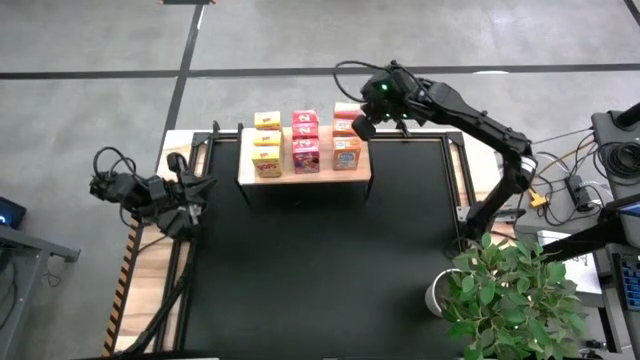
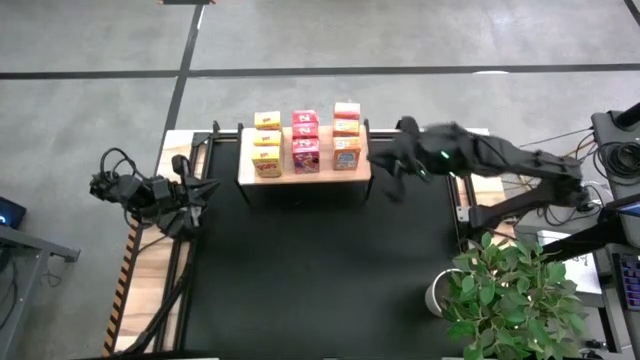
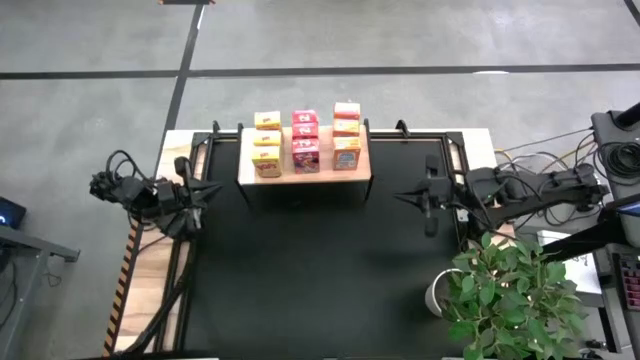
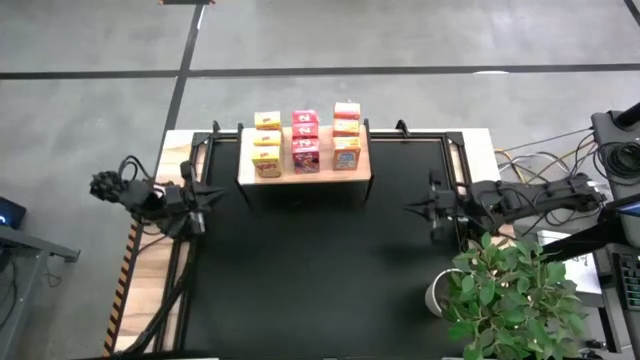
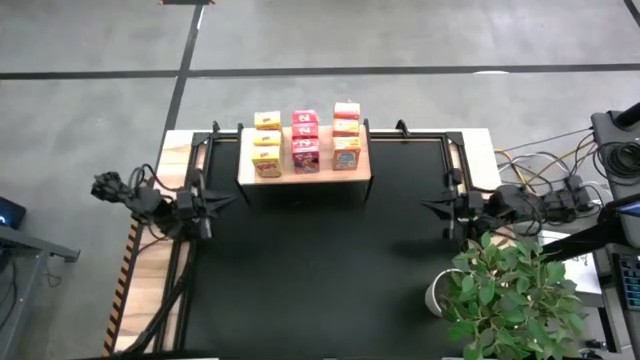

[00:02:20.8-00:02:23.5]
Task: Stack cereal on shelf
Return to Home Position

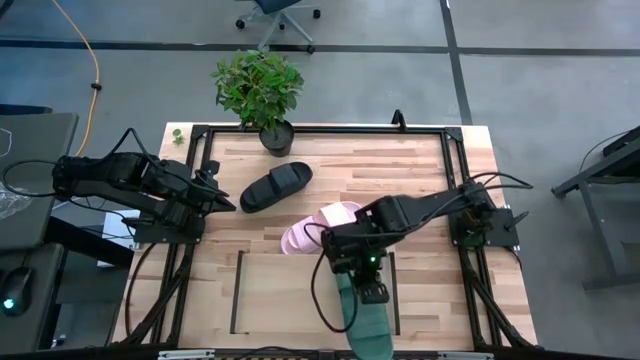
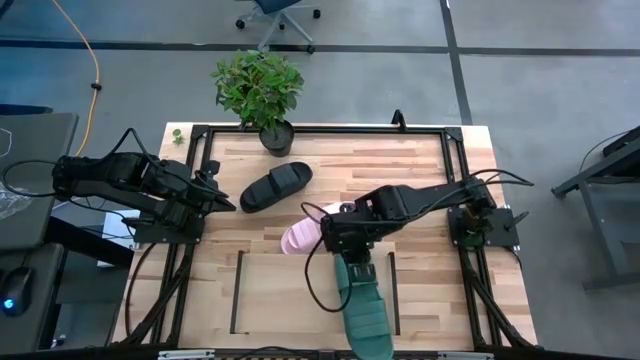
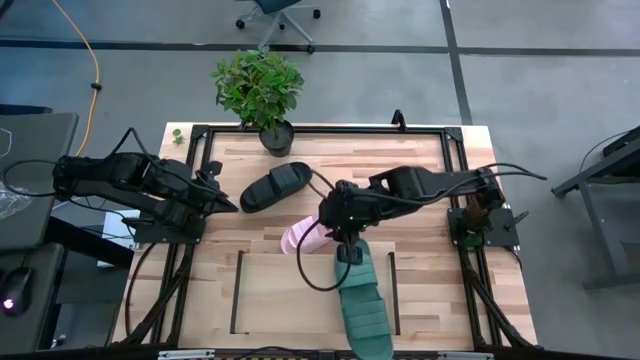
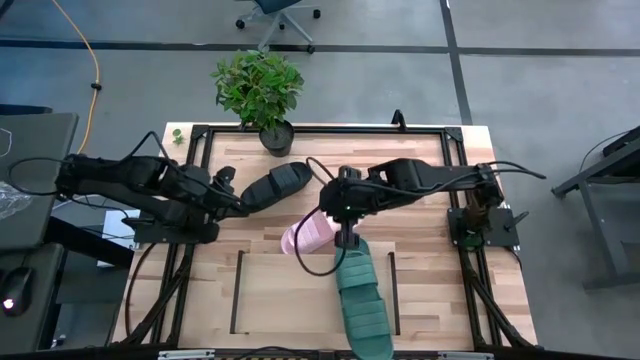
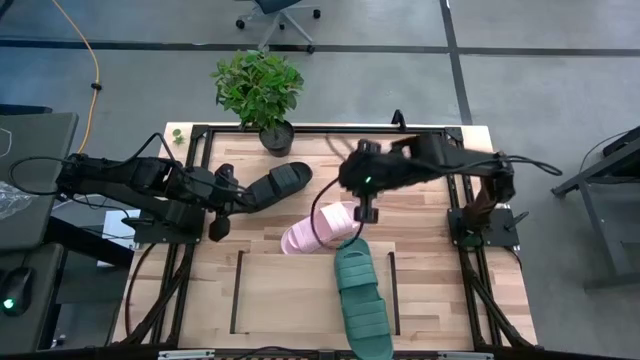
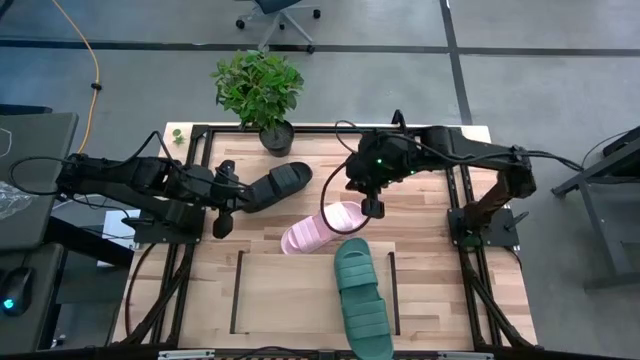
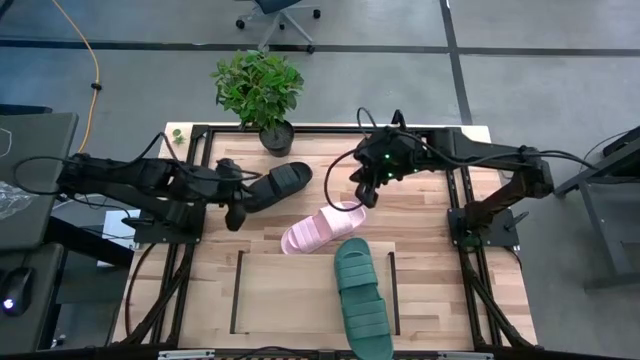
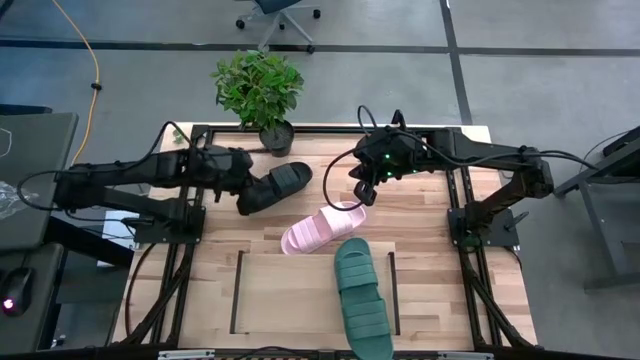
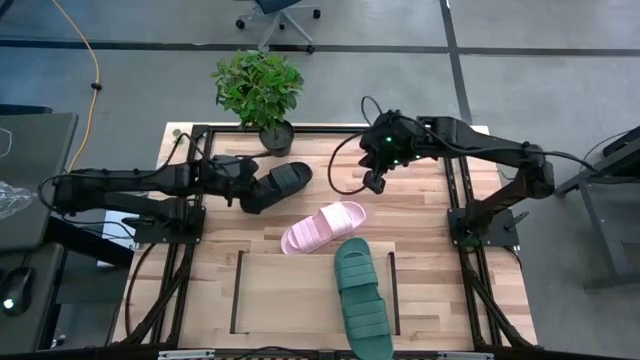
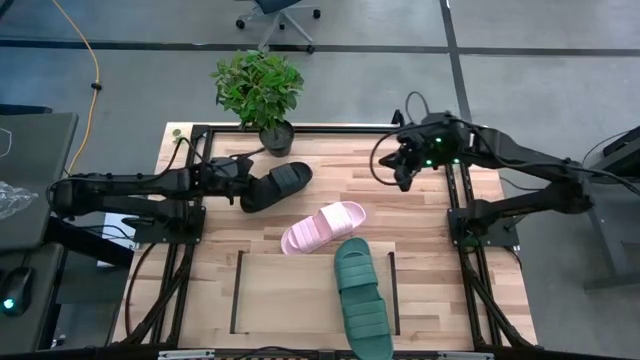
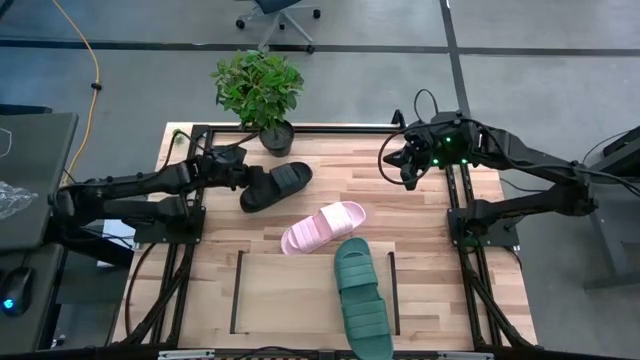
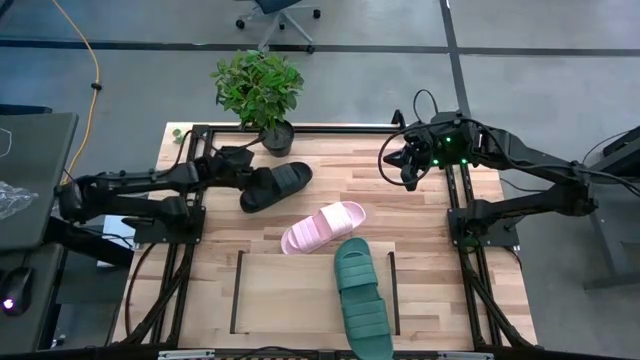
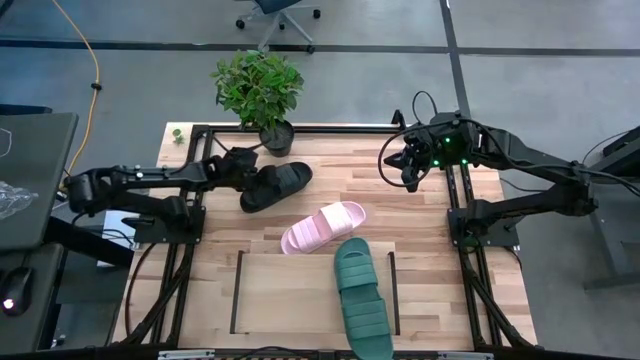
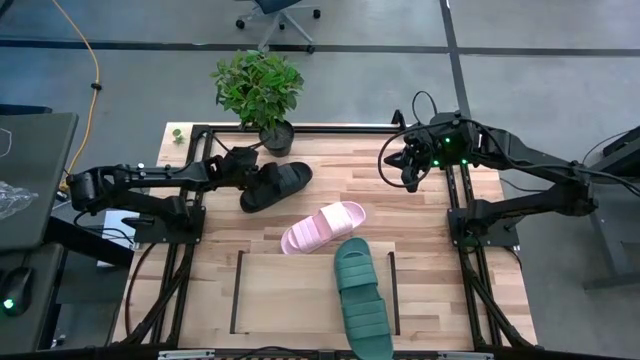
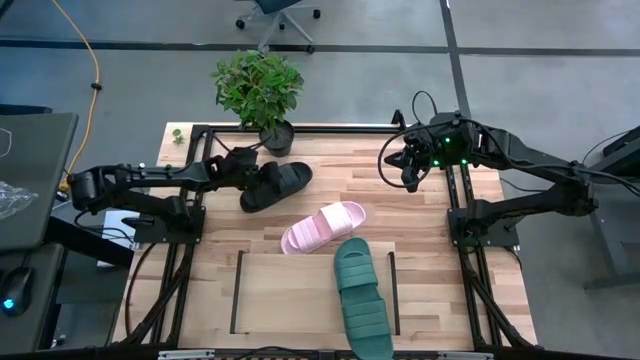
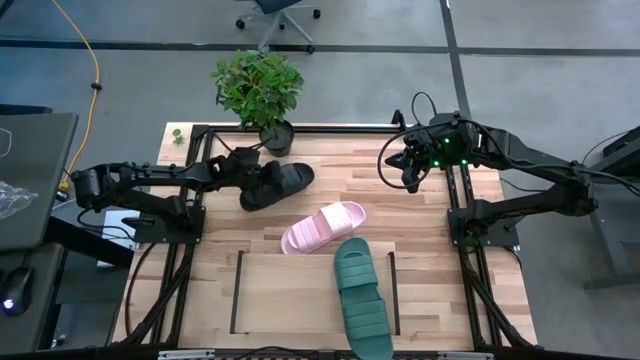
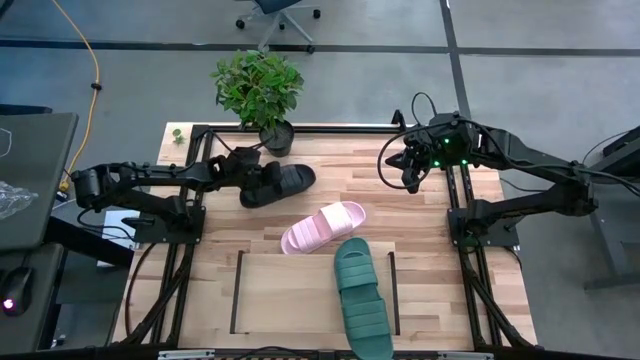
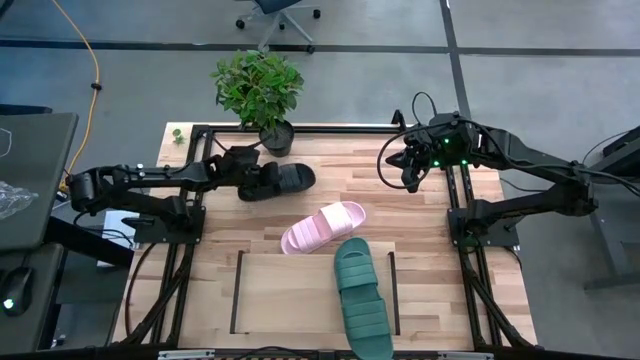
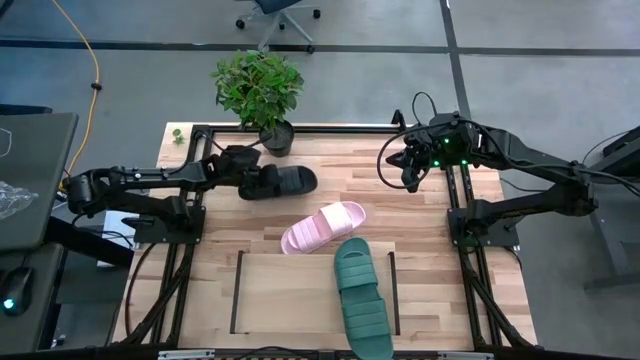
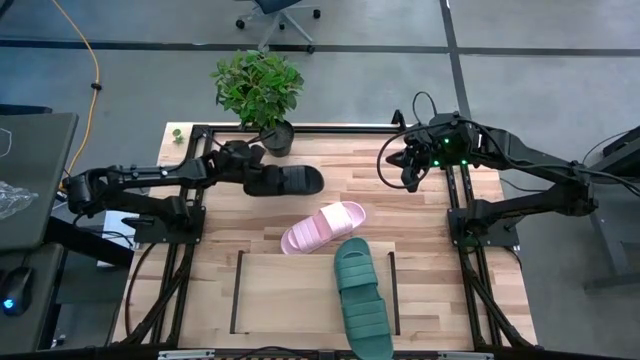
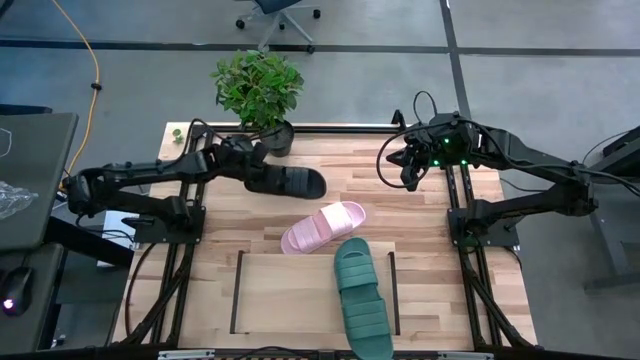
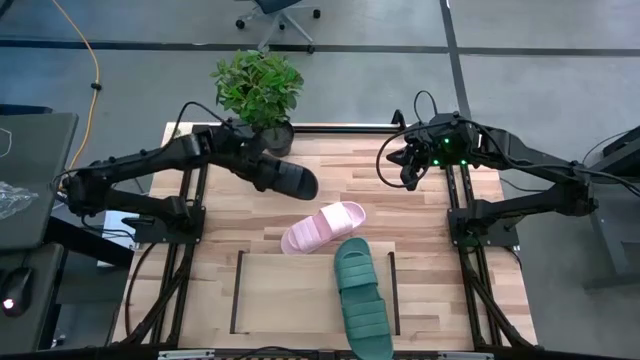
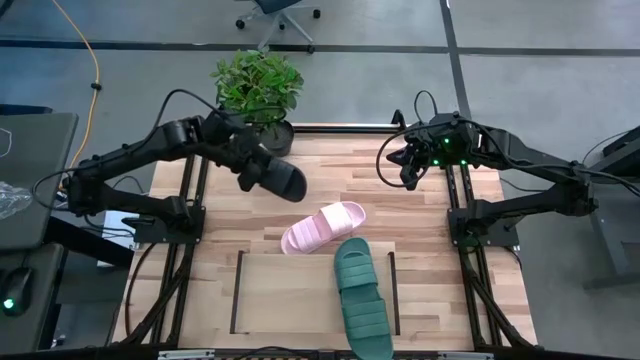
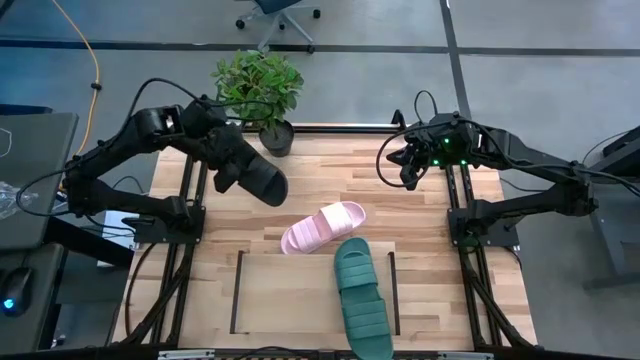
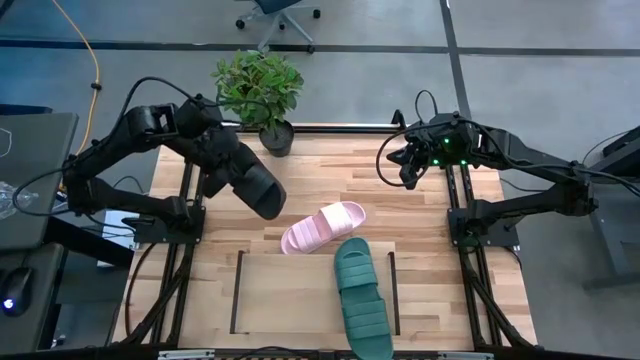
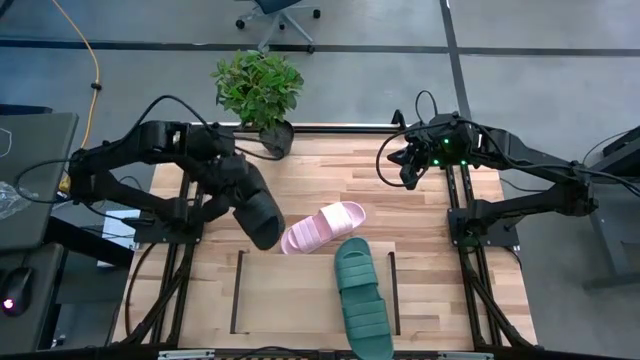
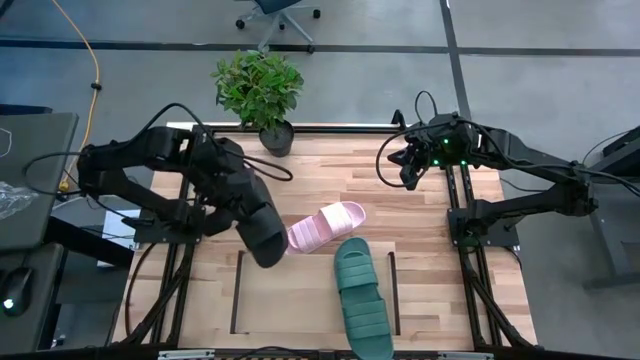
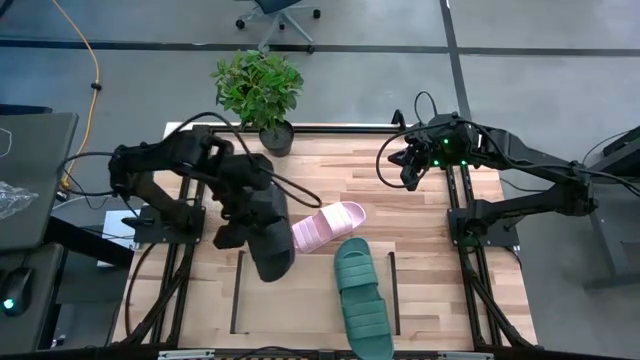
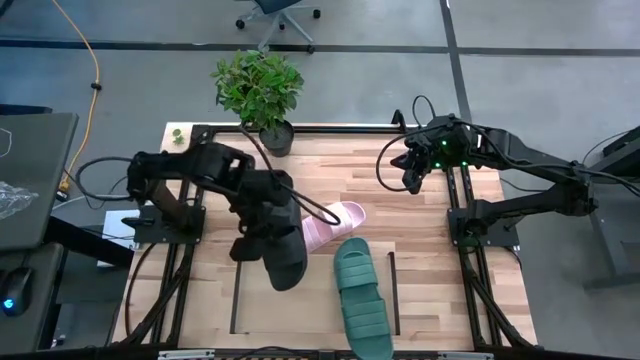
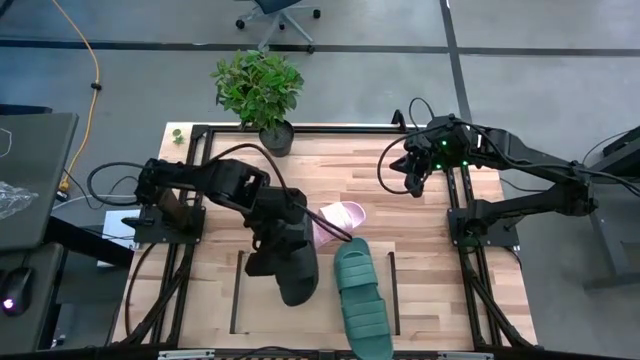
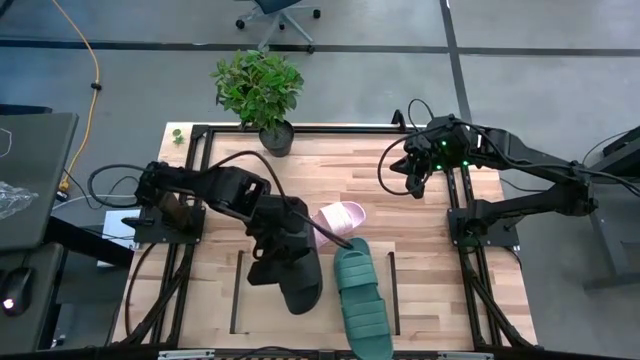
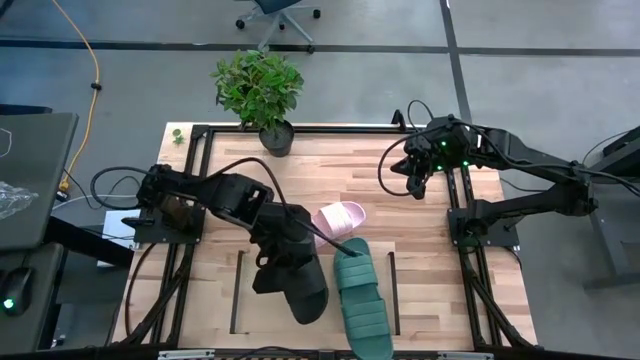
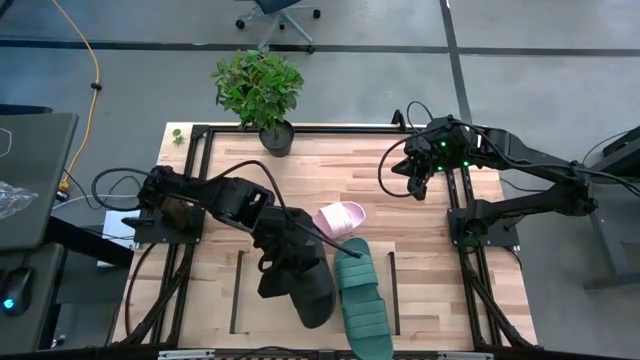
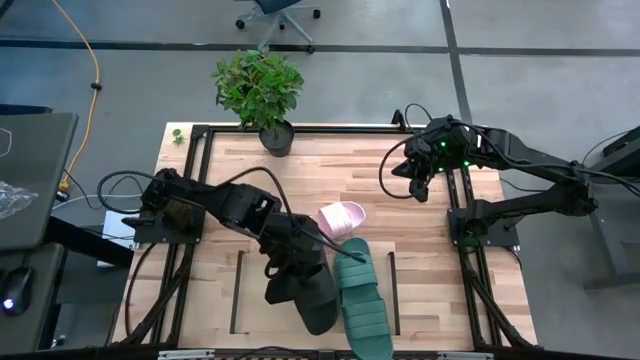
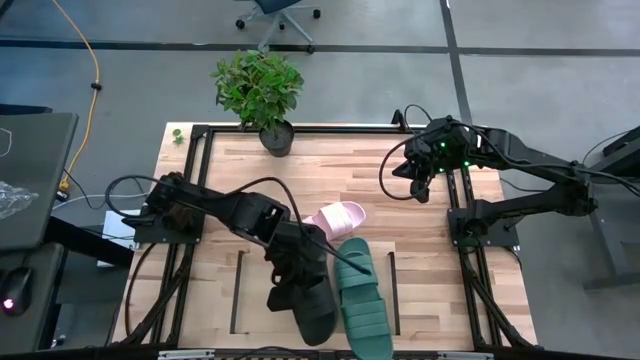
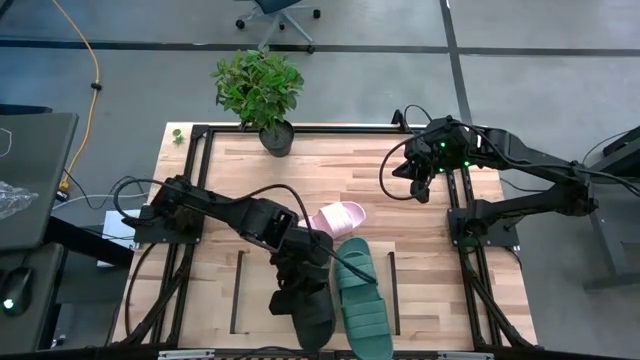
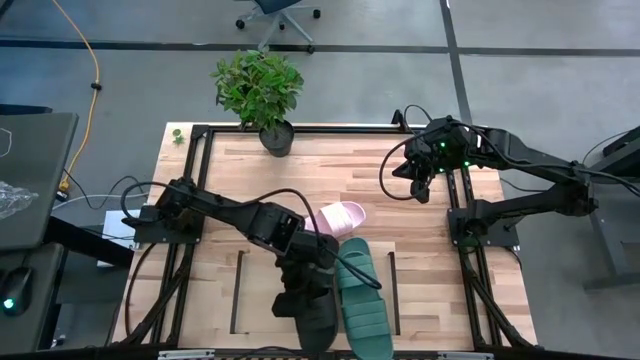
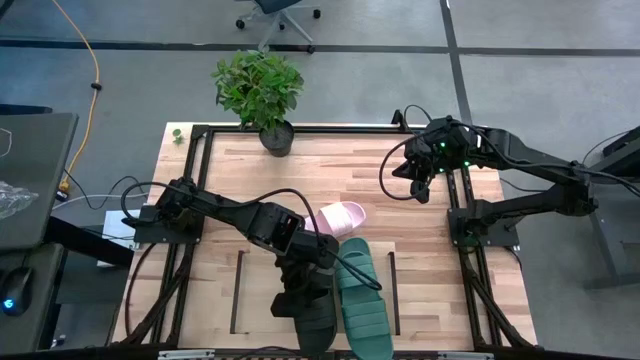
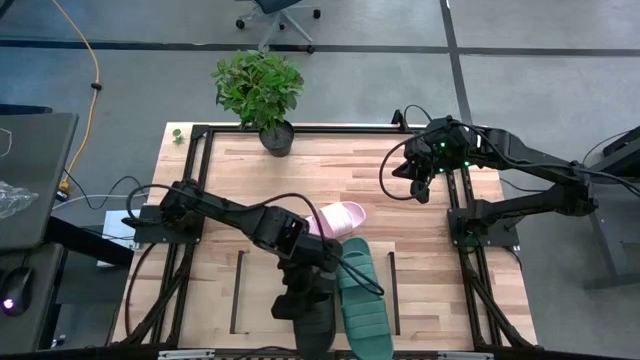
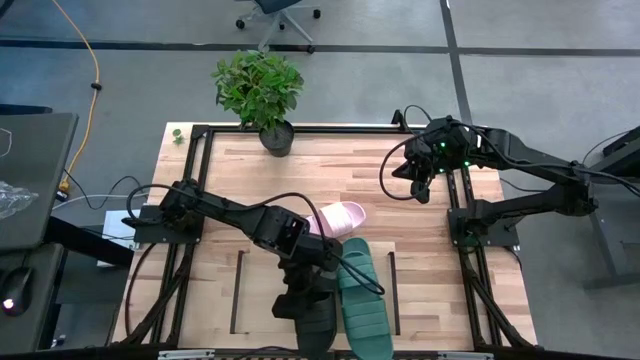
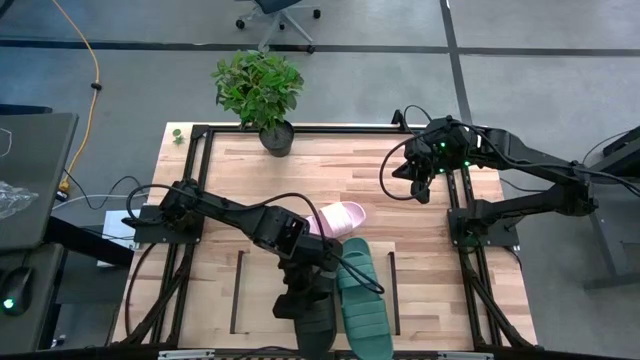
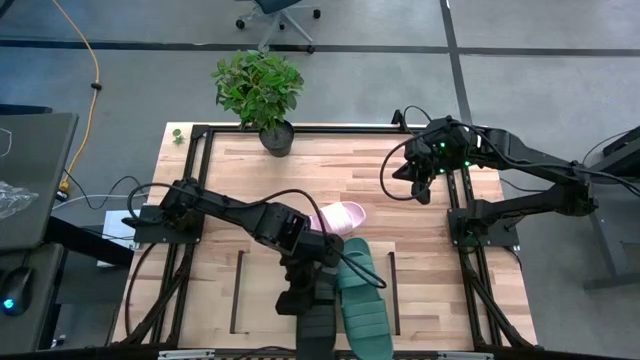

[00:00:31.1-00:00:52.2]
Task: Pick and place slides into the shelf
Put the black pair of slides on the shelf
